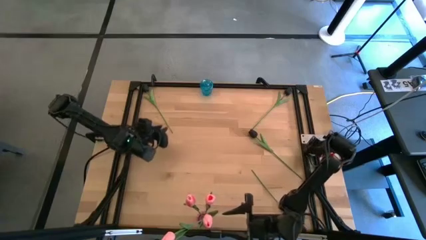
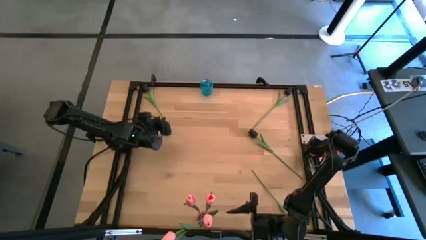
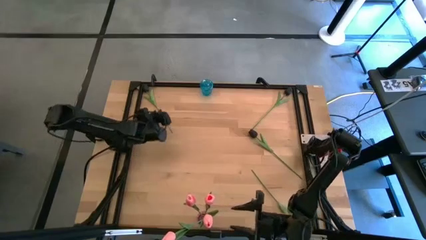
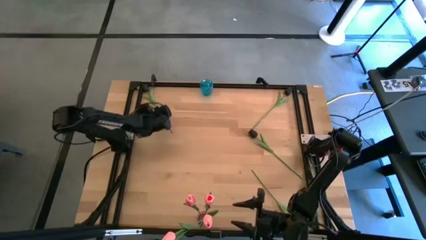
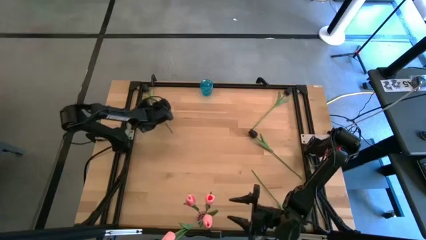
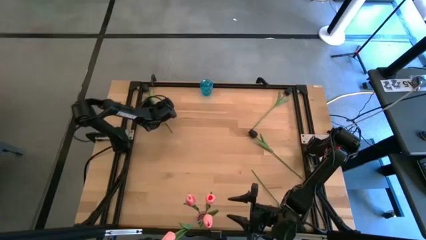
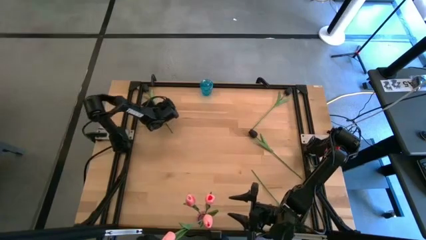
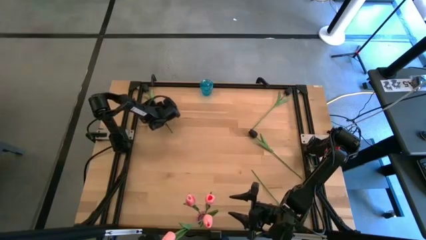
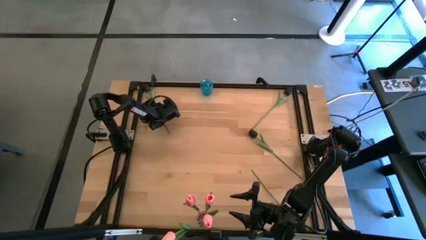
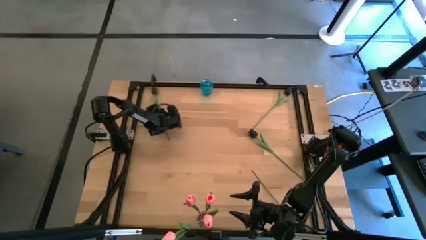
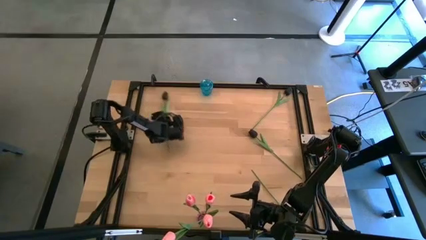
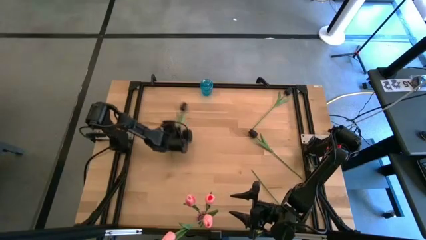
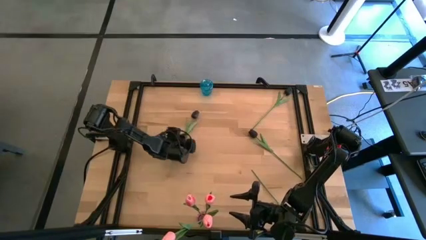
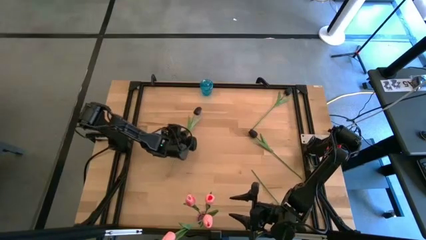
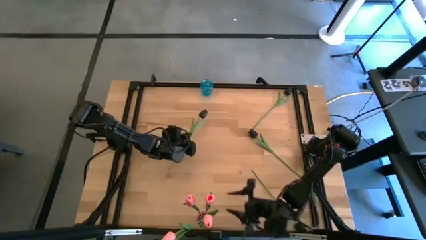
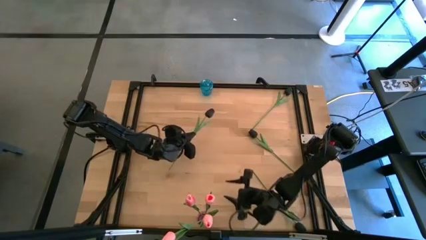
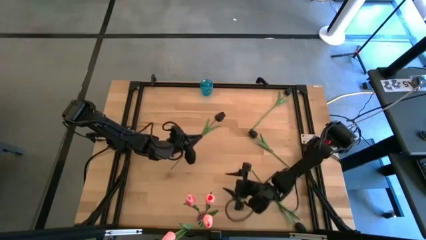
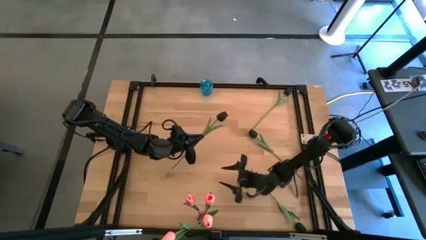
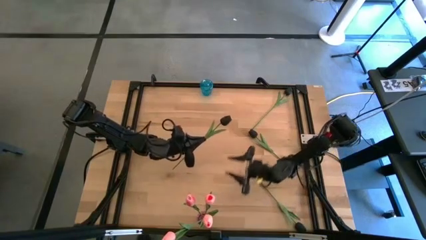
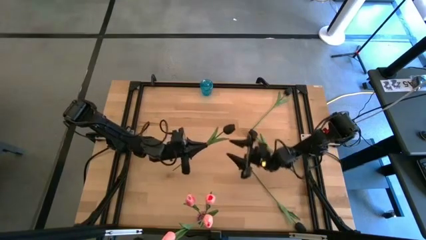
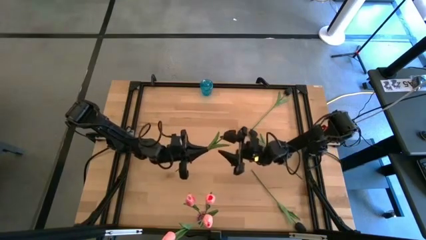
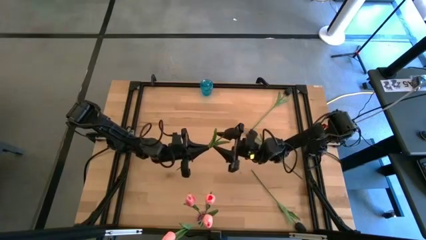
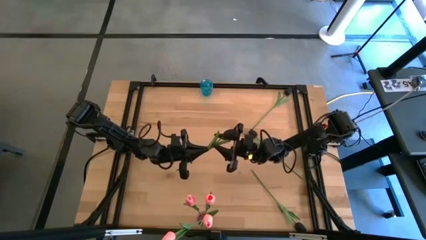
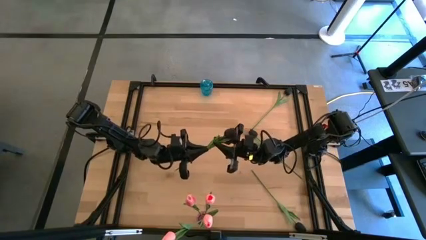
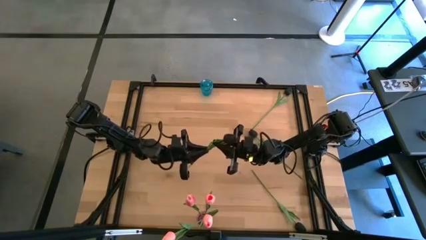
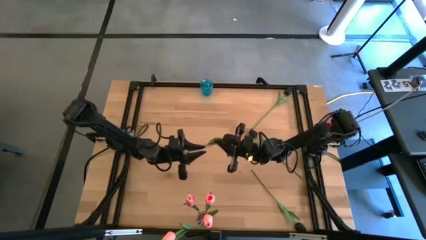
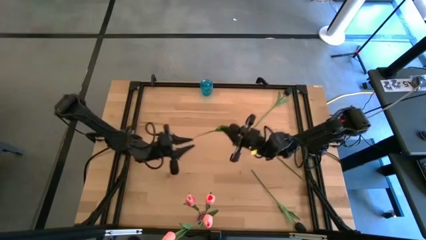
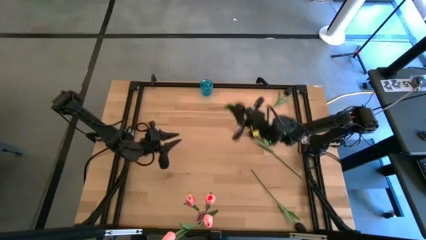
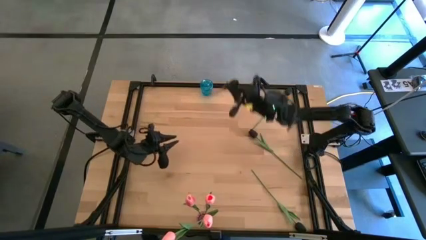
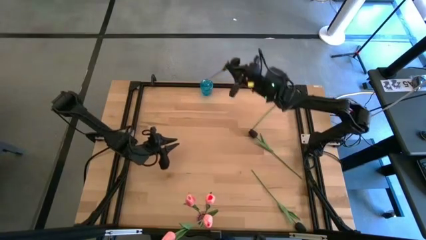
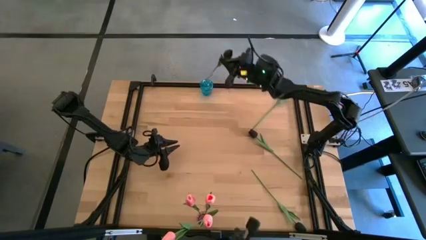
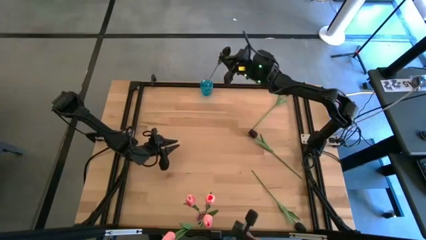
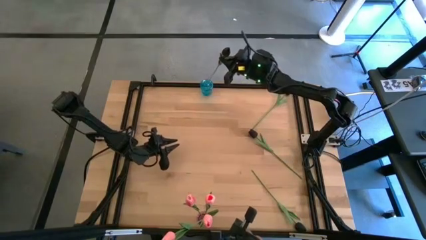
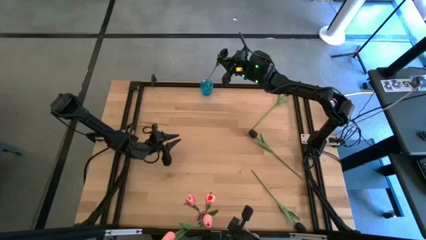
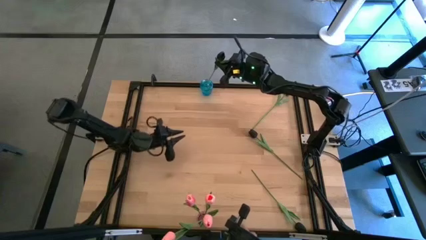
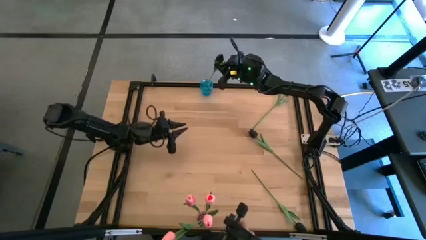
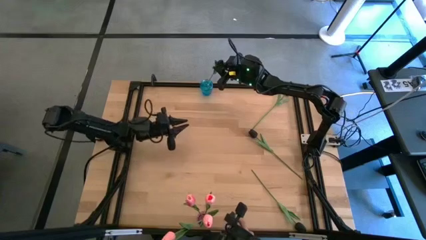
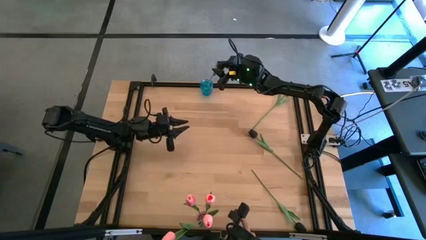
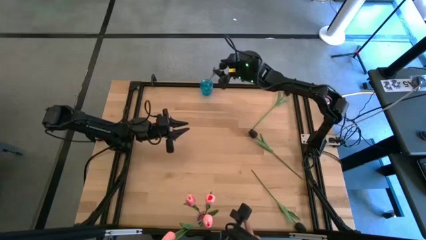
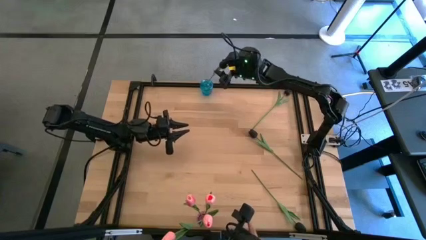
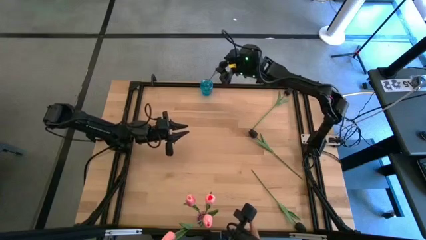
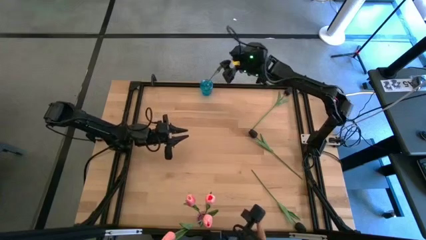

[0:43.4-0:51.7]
Task: Sort flowers into vase by color
Put the left black flower into the blue vase

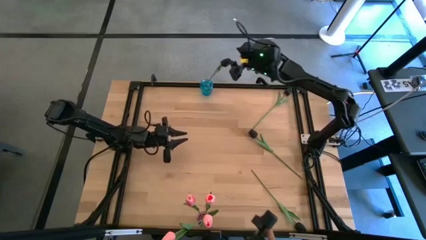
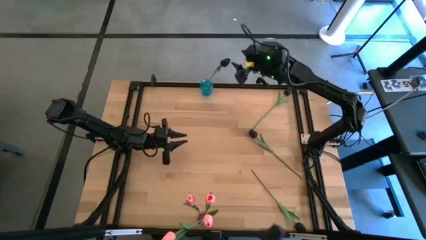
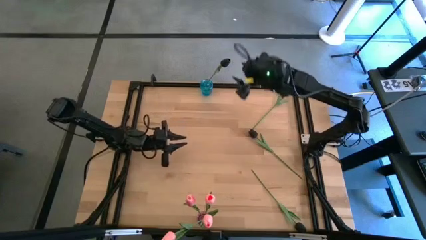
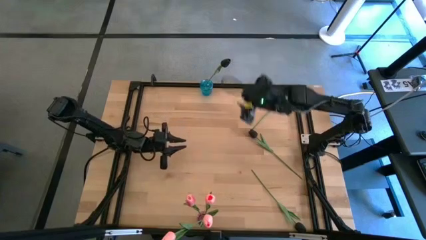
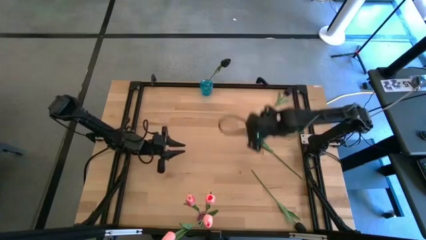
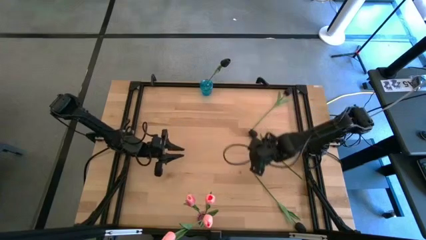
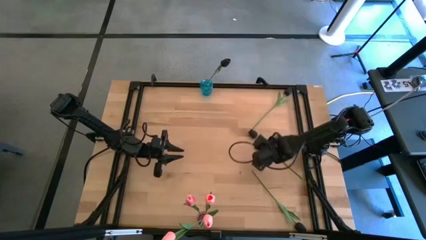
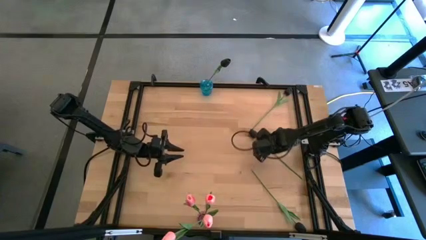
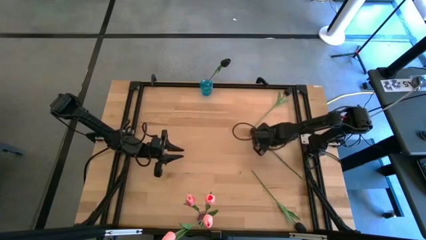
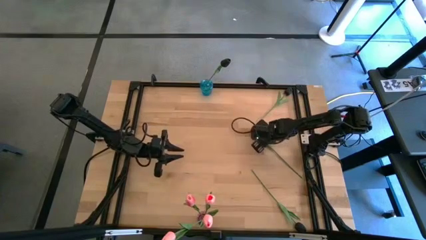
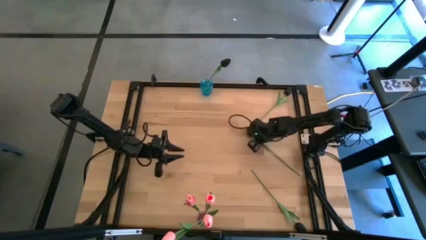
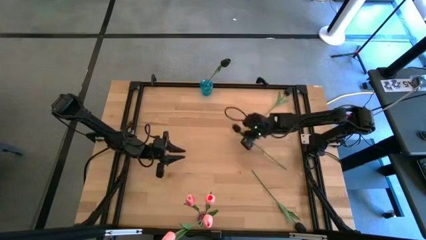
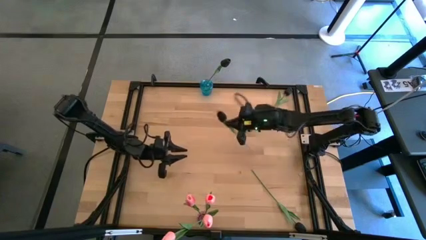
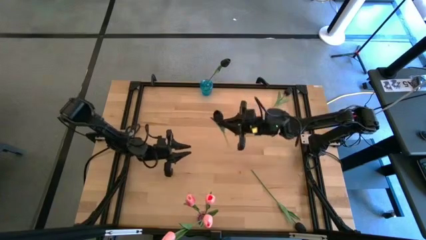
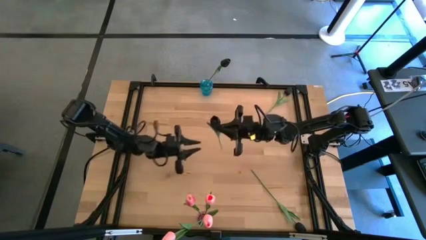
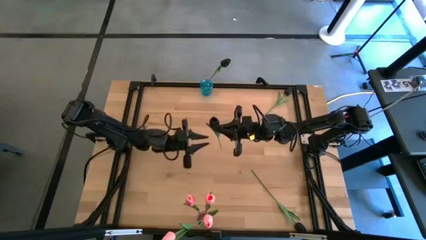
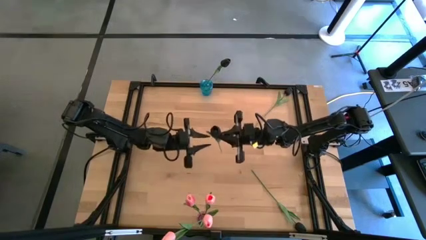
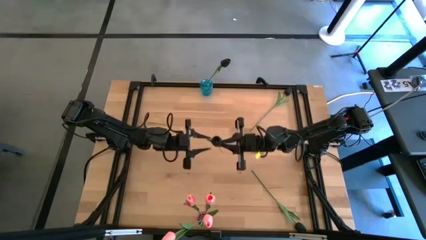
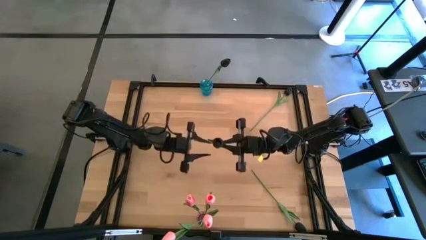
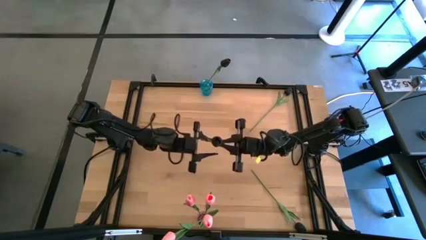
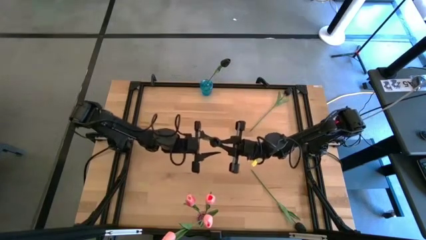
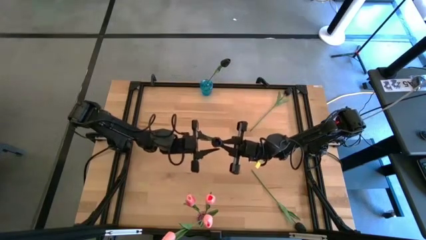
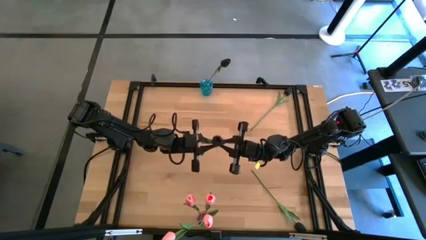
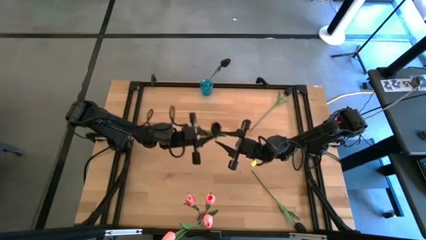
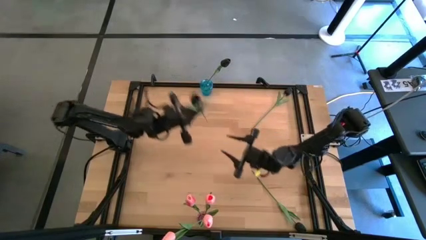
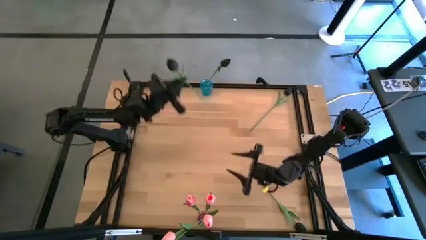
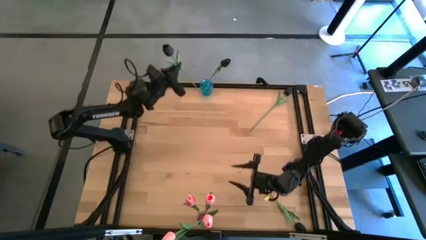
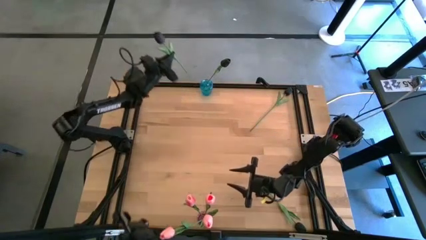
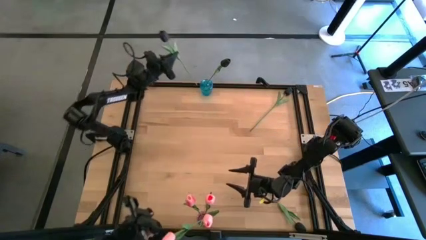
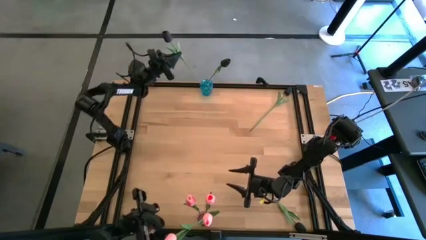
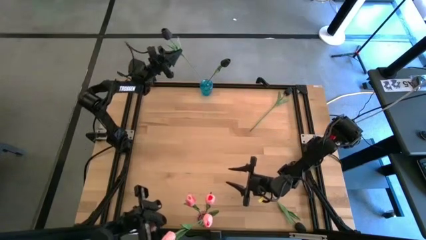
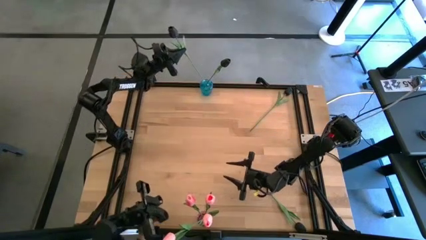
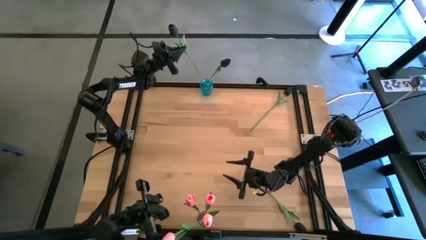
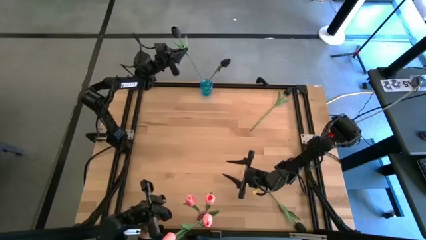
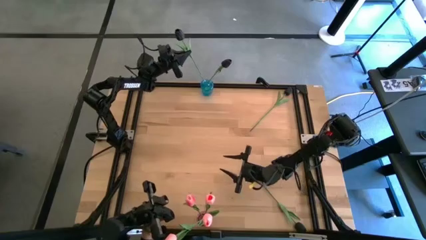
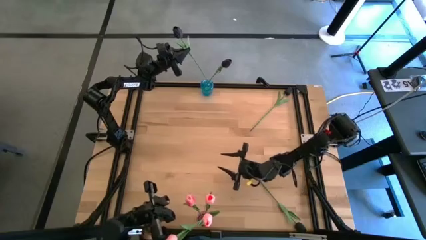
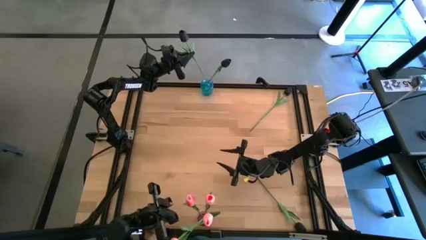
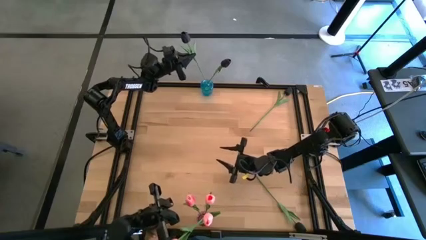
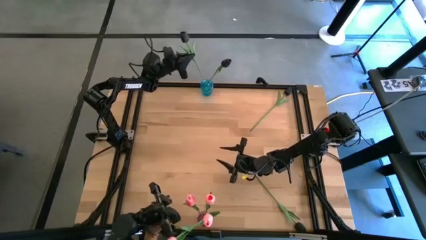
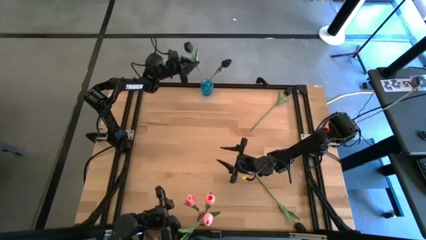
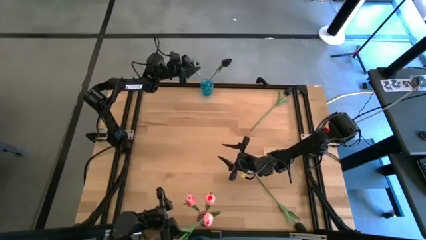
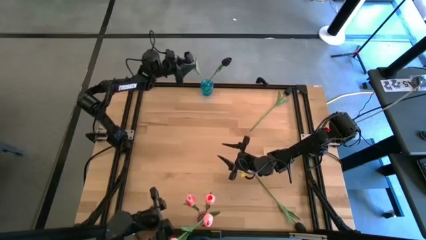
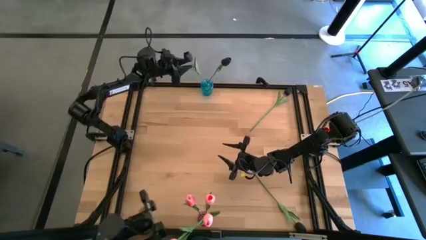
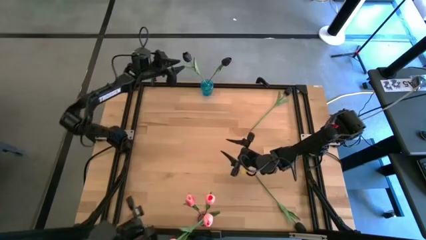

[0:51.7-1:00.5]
Put the middle black flower into the blue vase
